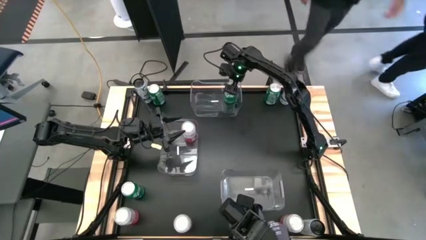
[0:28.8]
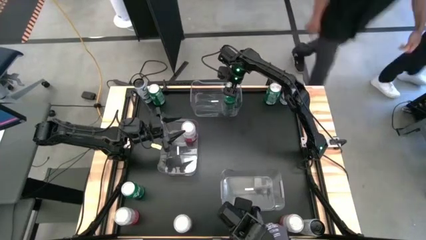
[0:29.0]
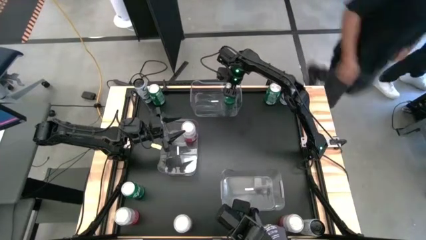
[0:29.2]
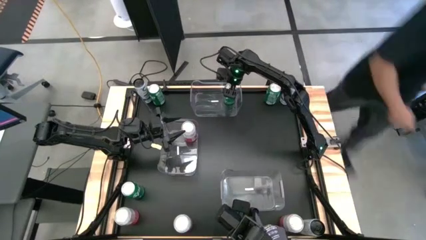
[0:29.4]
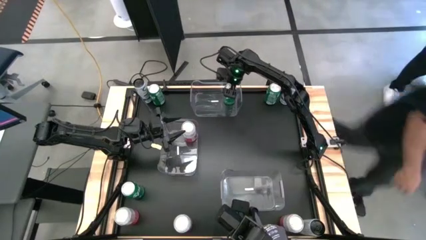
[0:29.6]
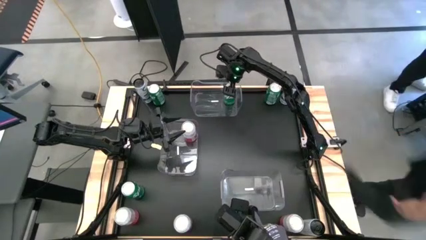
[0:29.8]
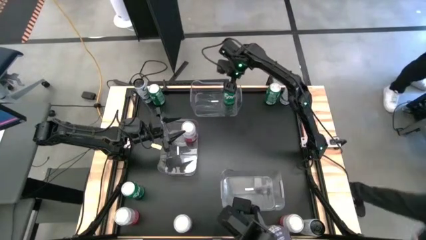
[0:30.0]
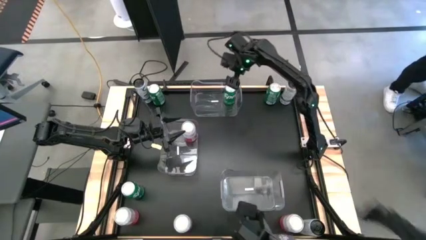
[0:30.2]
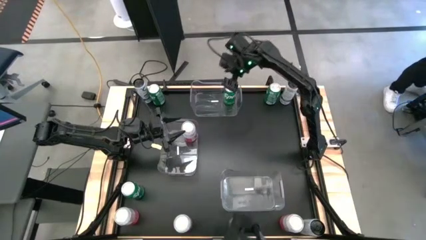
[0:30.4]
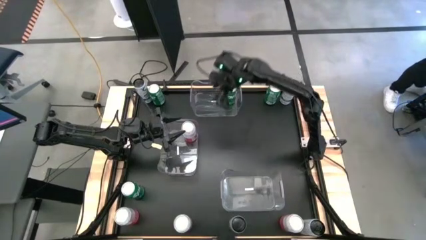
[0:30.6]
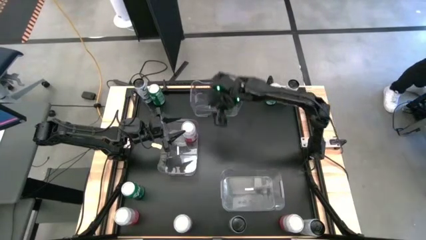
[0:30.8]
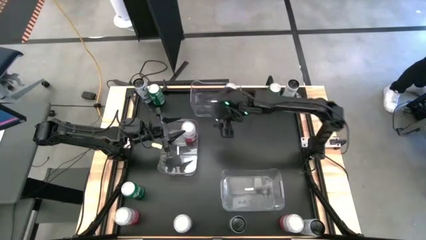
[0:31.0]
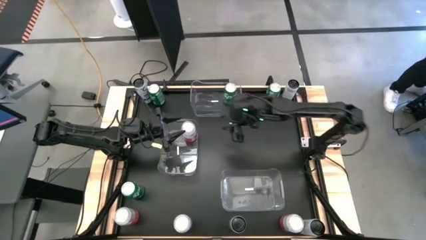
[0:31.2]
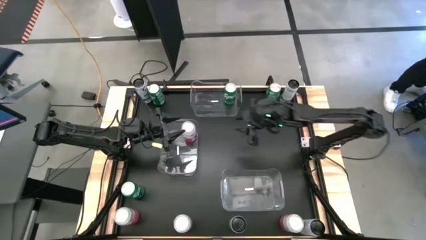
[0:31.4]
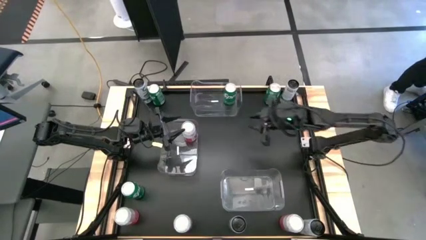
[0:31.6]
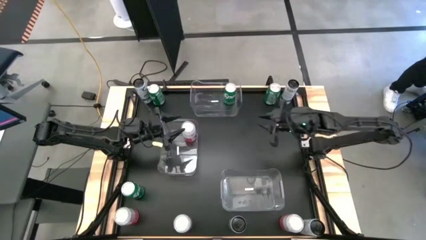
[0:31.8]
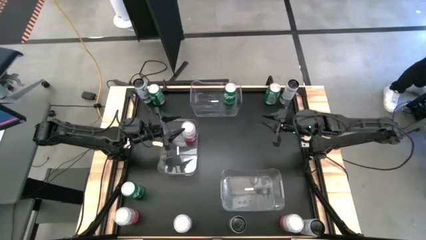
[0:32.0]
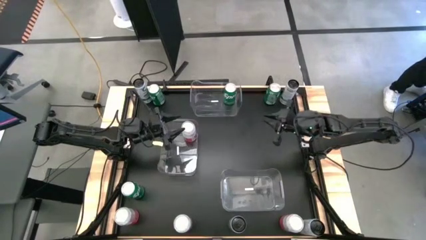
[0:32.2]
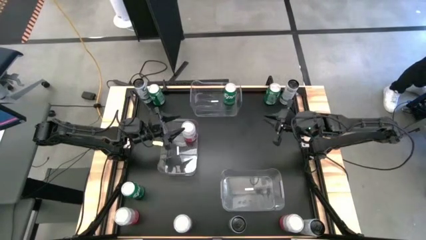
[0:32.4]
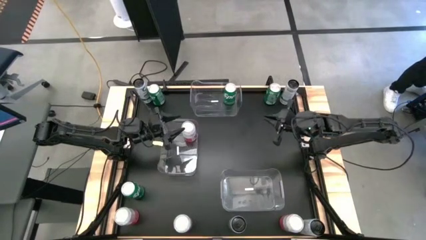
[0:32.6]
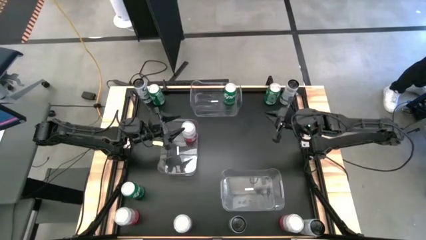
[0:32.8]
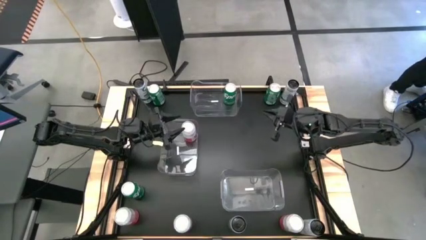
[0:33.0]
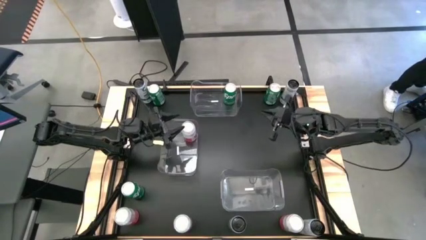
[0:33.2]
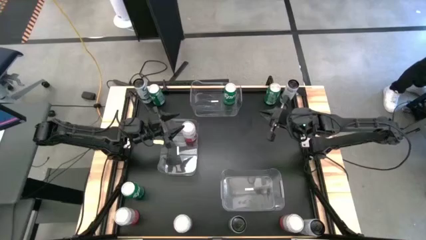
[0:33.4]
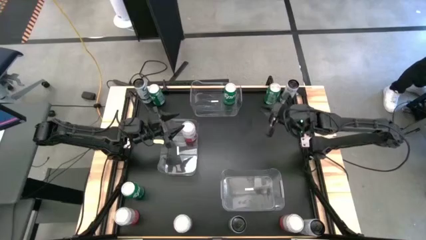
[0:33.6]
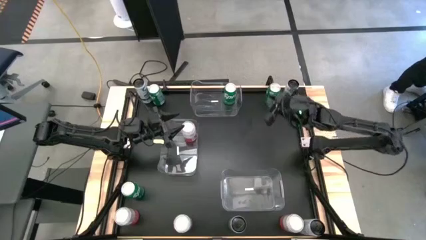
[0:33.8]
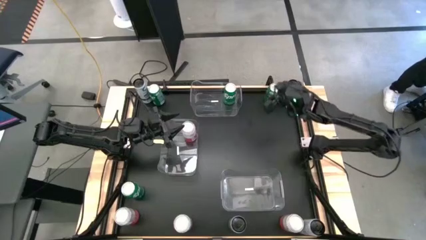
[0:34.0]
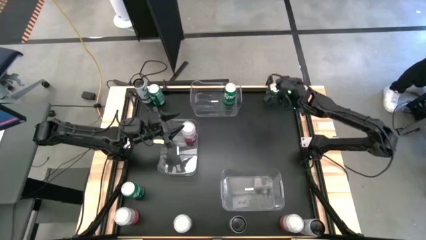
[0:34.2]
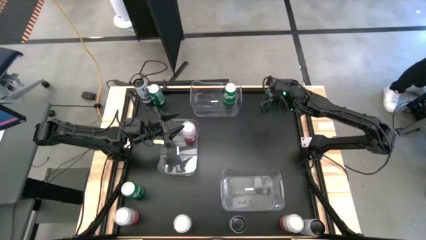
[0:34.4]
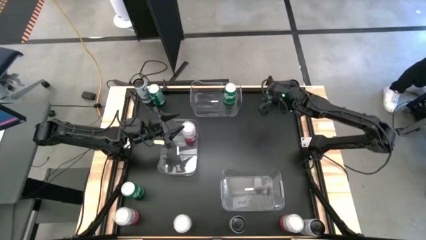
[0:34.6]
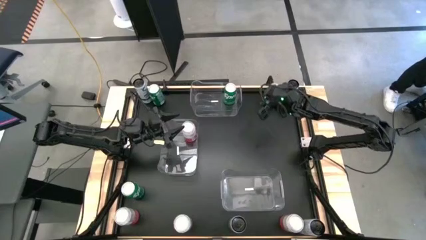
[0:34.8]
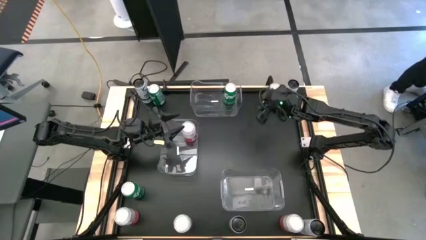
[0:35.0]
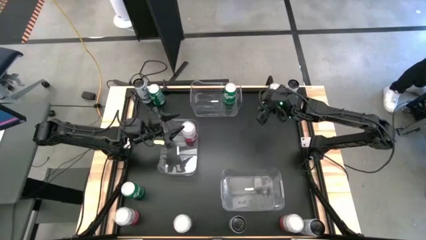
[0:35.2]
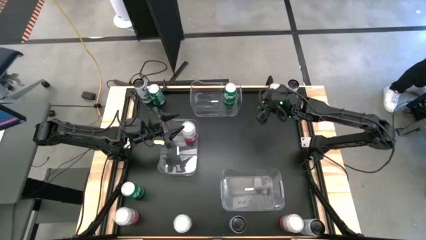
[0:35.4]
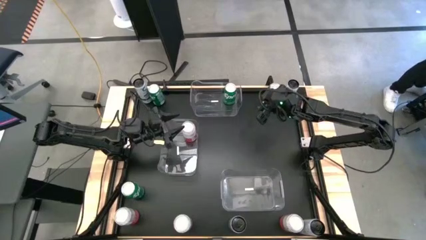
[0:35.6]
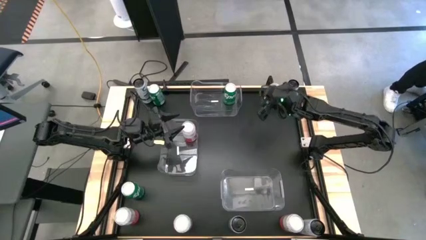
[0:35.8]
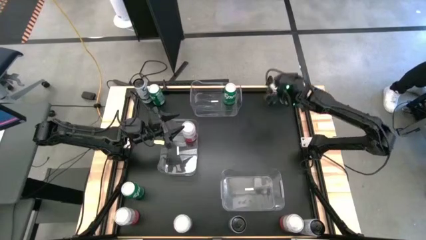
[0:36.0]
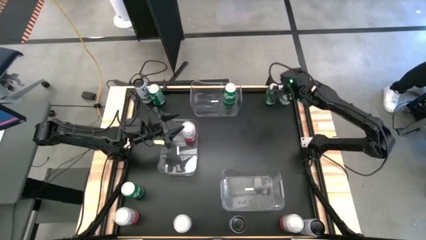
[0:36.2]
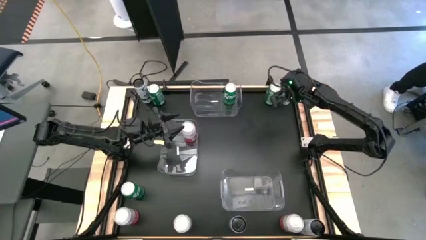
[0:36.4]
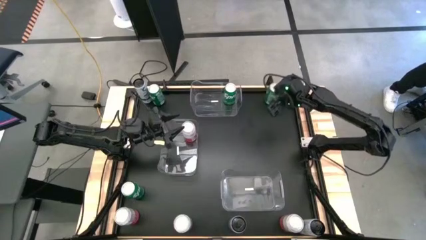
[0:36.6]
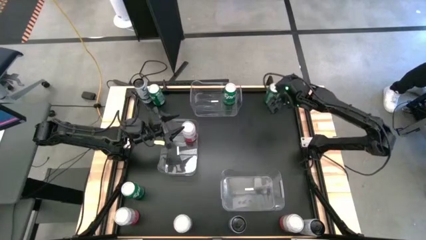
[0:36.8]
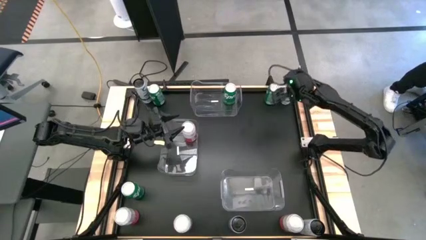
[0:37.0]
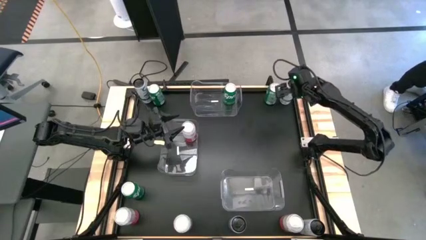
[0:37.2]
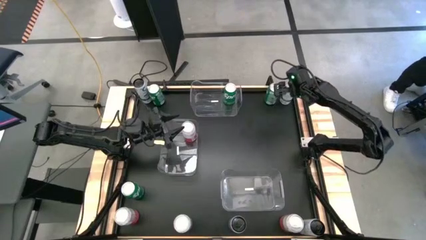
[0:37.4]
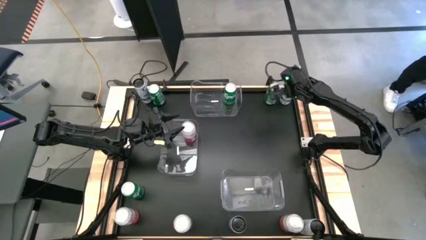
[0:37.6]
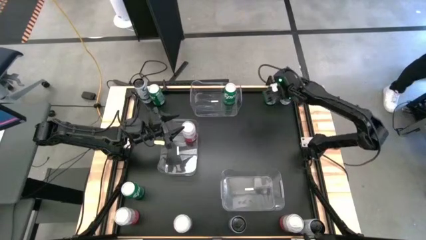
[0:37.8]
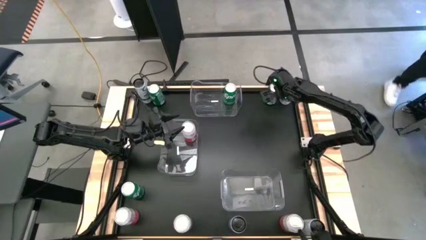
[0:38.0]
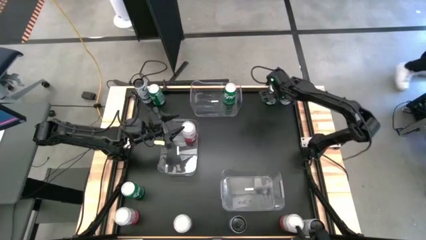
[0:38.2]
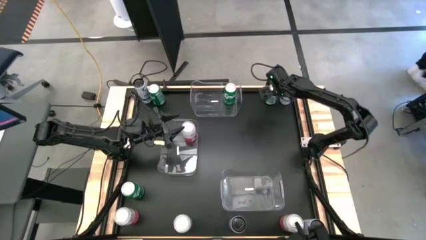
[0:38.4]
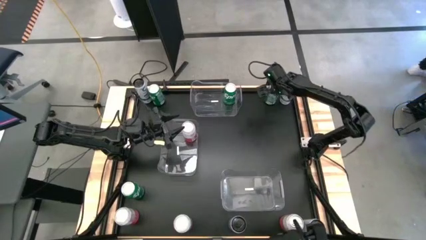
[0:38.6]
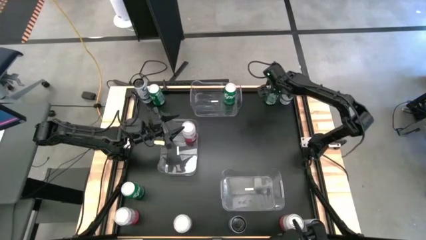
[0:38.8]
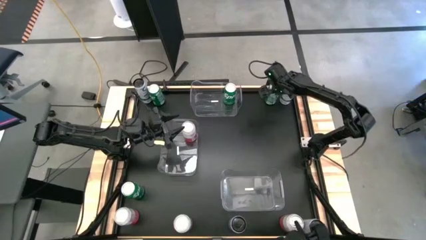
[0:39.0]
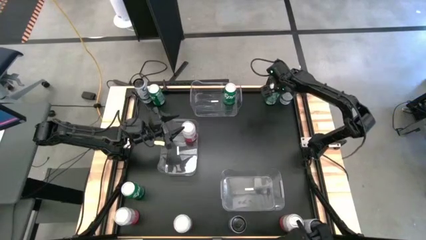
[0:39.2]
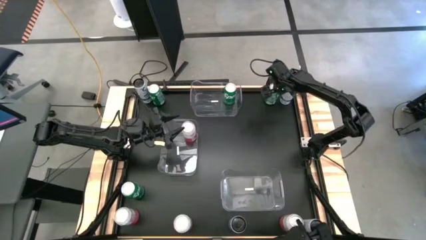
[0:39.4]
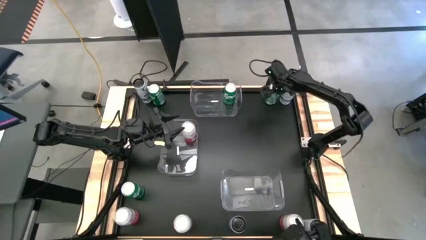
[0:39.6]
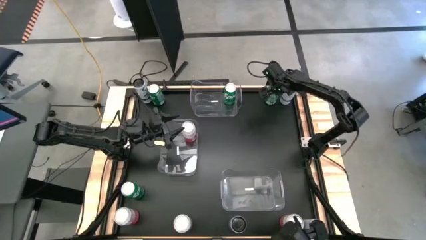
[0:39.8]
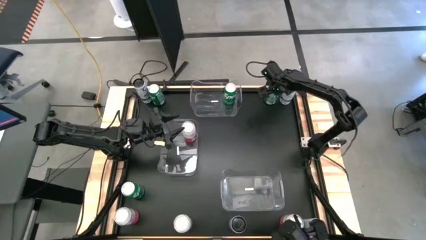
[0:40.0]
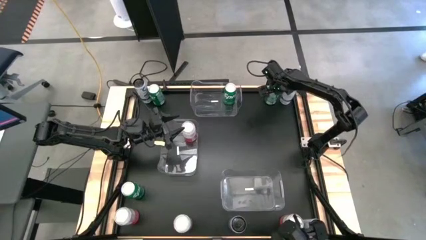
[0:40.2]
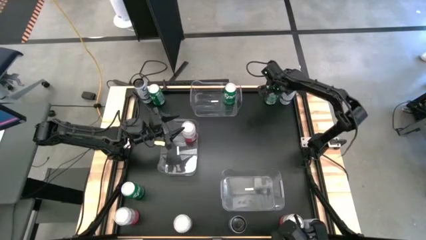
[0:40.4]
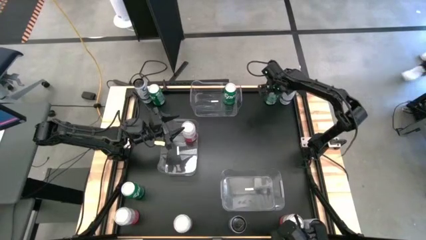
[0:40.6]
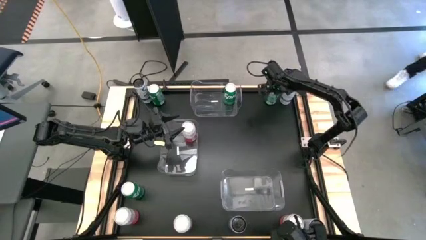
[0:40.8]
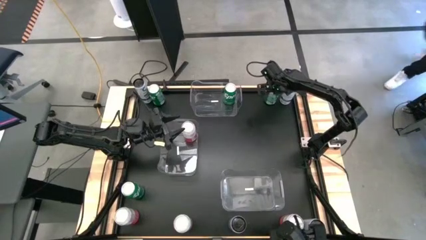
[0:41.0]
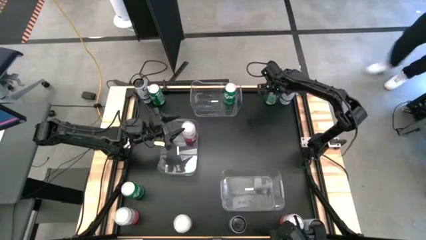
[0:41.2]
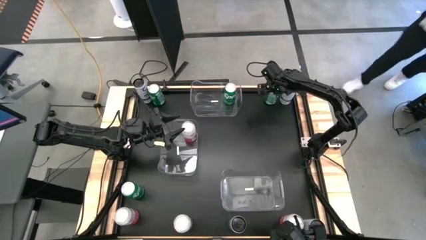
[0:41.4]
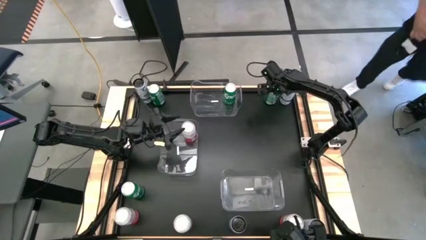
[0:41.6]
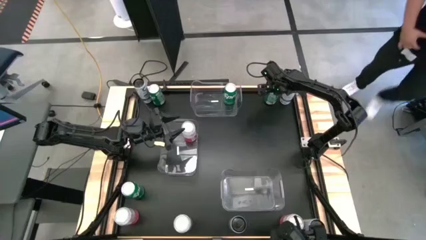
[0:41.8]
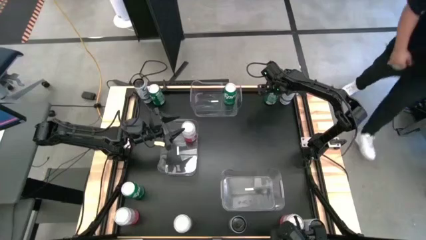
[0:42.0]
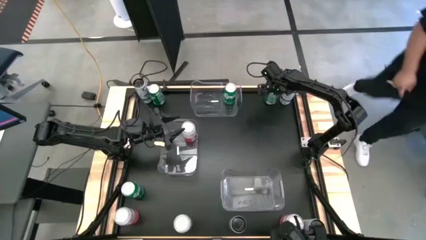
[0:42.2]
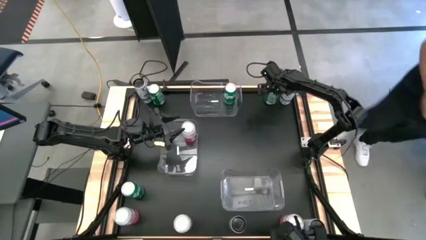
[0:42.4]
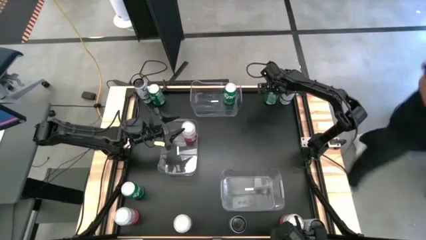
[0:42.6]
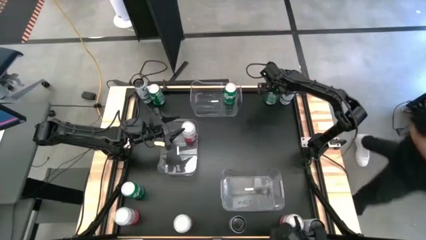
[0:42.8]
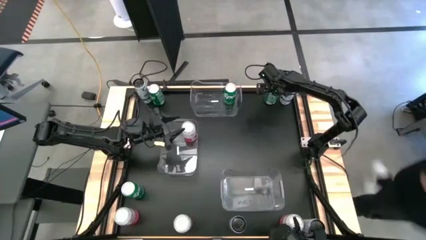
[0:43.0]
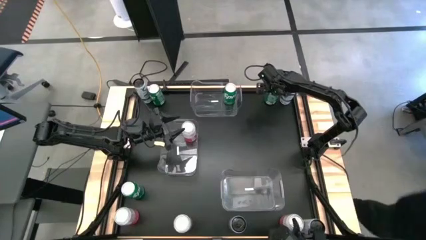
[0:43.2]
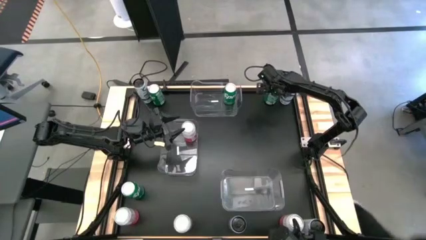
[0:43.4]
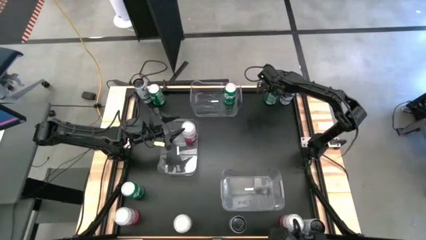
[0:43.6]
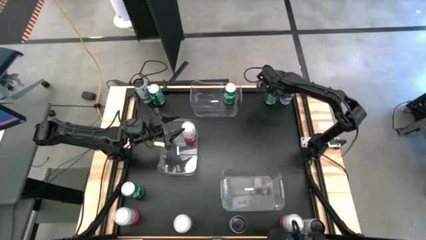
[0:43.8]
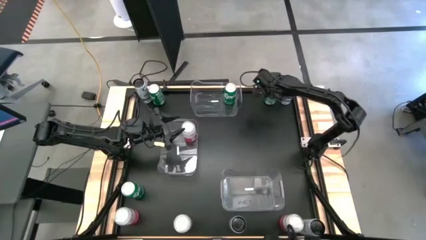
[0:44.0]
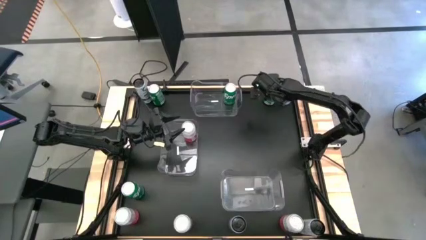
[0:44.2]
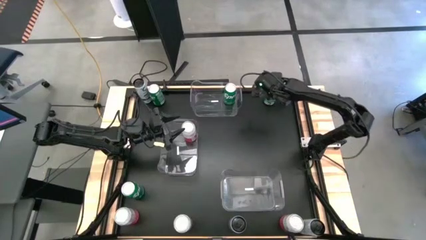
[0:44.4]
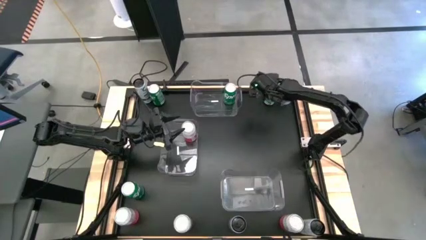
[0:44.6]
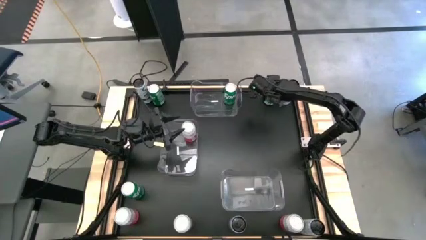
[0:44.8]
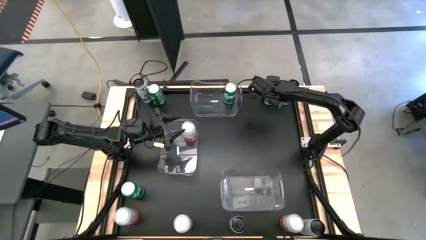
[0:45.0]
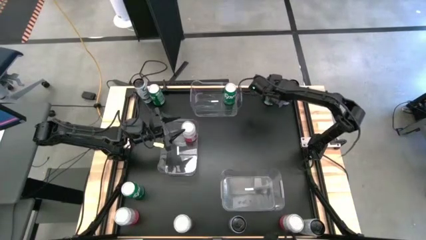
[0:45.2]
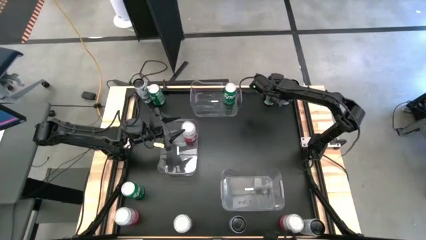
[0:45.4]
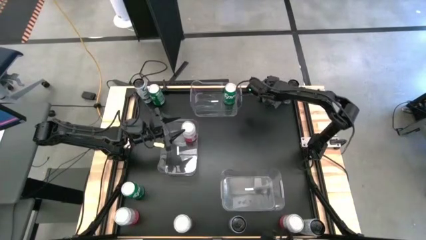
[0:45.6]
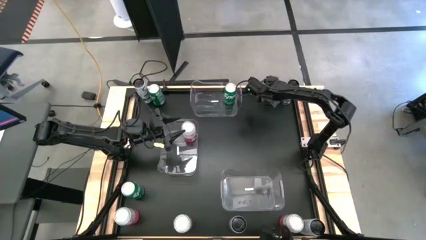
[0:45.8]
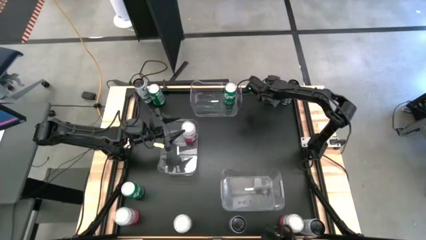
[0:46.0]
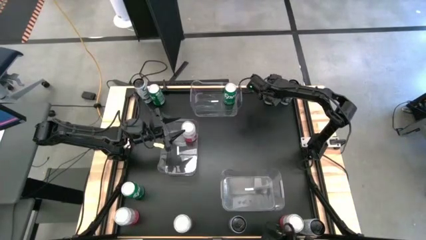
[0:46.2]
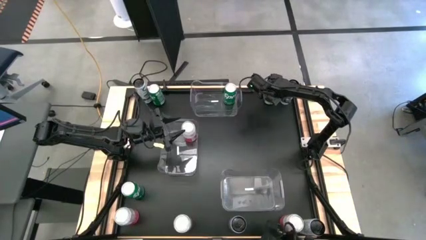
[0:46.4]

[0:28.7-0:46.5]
Task: Sort soda cans
Put the green soda can into the top transparent bin
